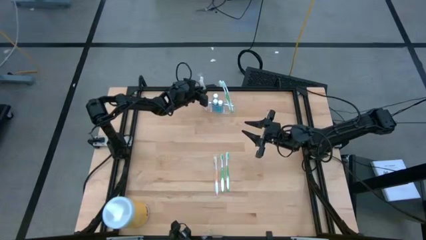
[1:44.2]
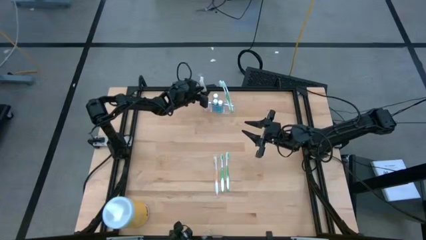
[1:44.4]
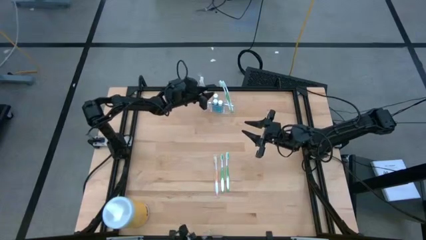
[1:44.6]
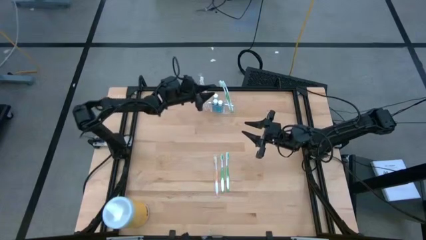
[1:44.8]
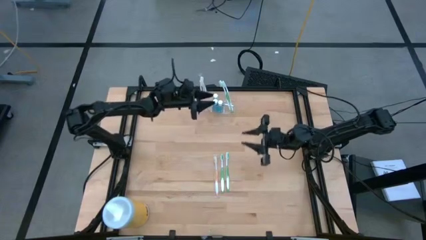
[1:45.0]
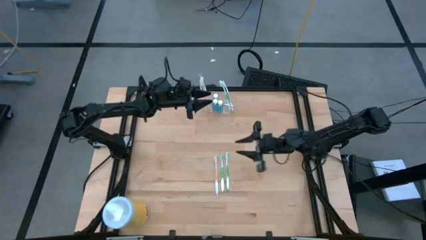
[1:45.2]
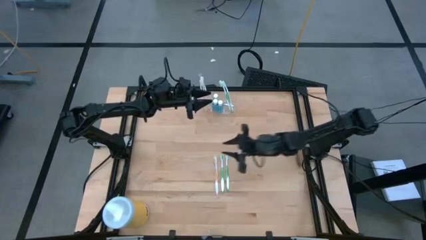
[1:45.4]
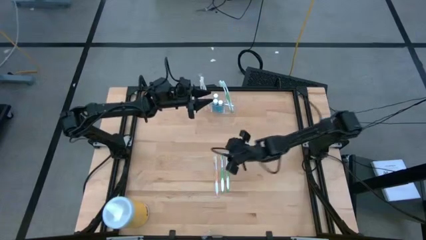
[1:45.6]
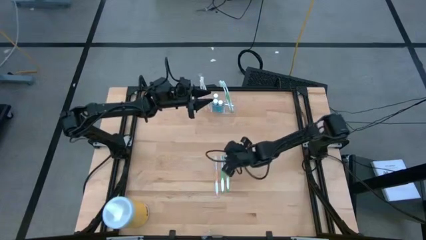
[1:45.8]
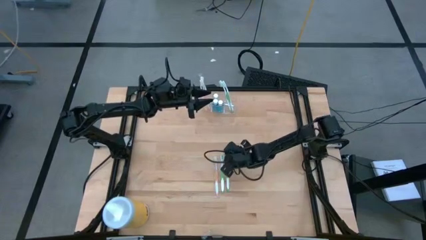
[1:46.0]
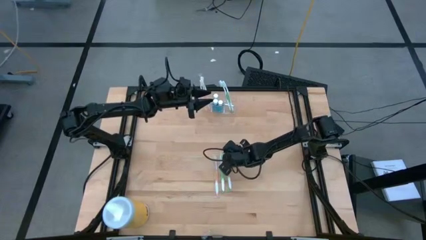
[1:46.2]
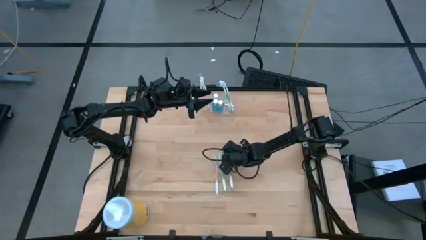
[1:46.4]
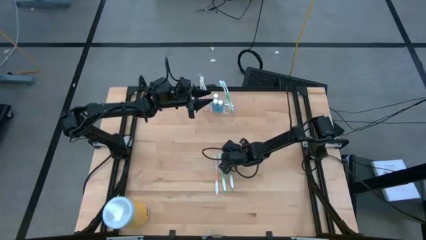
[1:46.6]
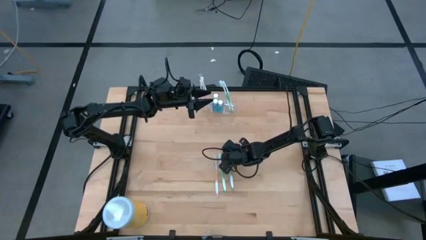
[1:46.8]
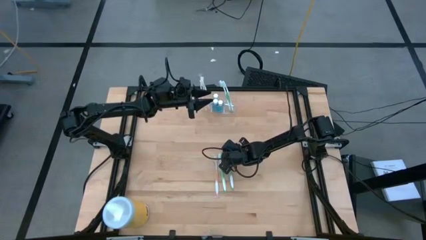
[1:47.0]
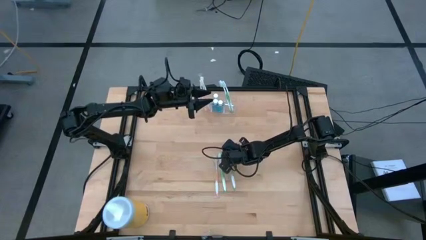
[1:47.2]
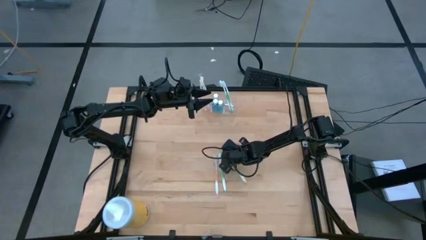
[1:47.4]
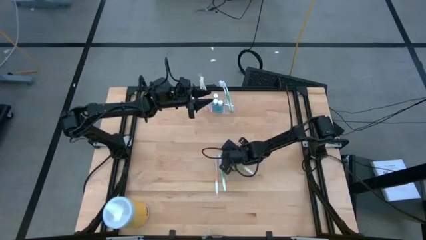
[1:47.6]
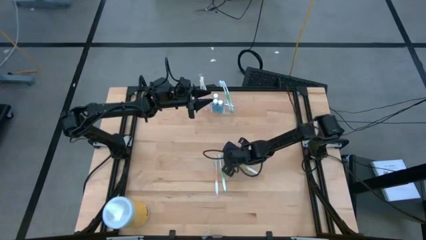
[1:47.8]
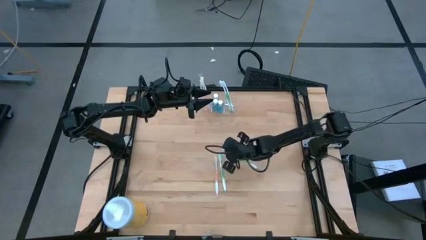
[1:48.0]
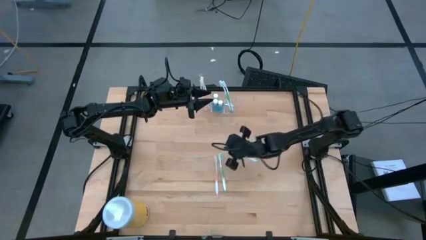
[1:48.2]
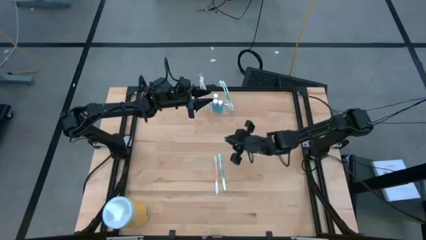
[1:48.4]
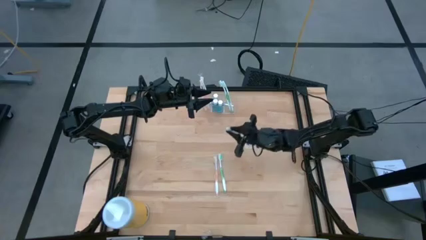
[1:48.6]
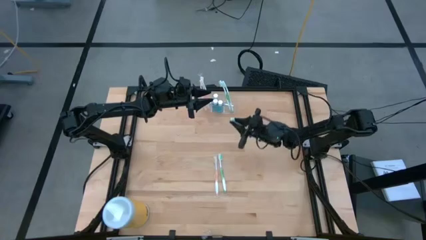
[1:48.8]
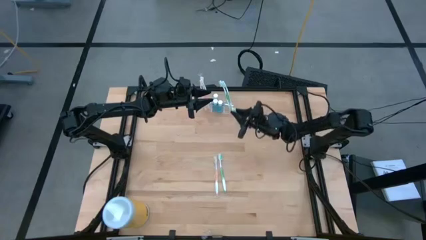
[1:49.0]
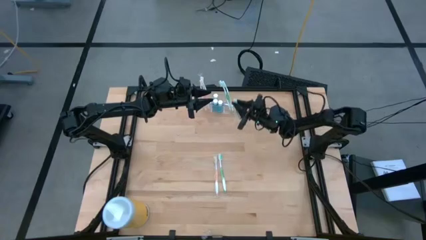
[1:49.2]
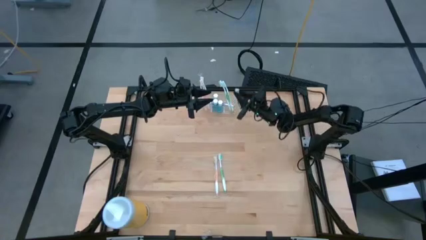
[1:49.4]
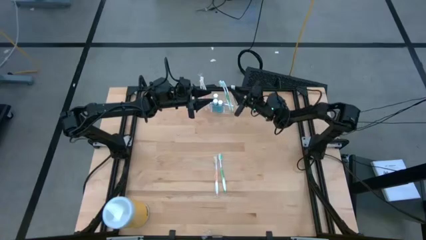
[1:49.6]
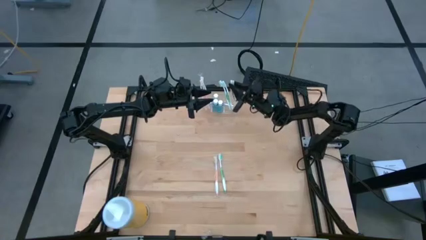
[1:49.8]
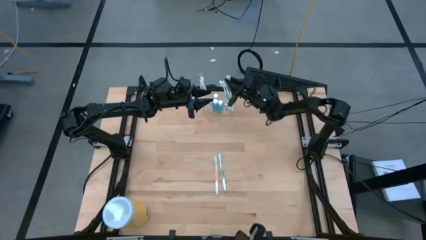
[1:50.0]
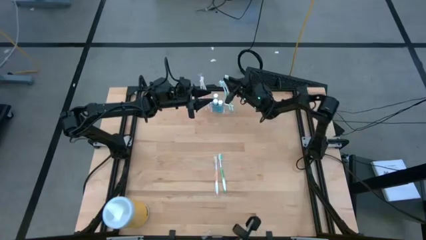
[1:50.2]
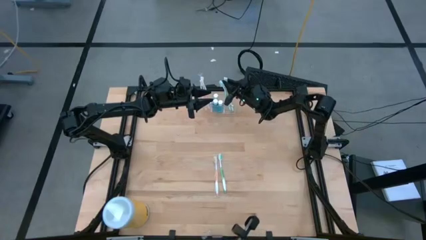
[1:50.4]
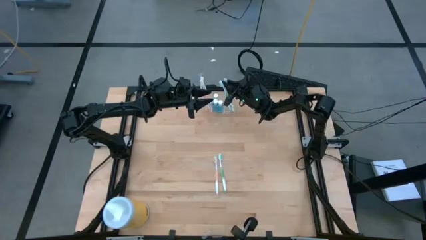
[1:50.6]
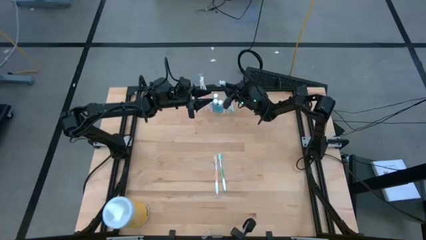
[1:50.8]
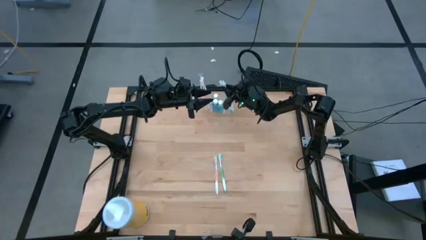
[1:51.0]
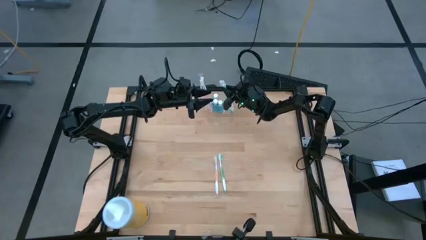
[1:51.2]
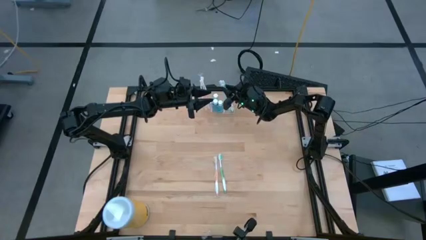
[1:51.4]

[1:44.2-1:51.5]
Task: Pick & Place toothbrushing station
Put the green toothbrush into the transparent organizer

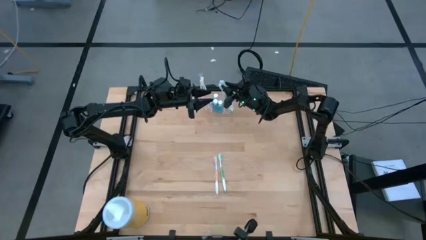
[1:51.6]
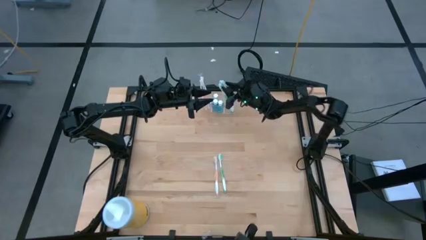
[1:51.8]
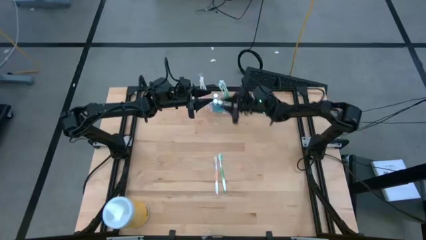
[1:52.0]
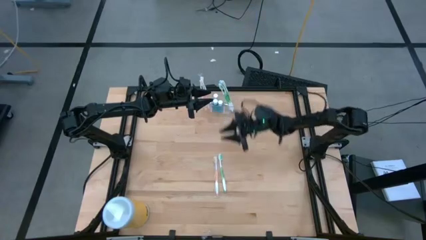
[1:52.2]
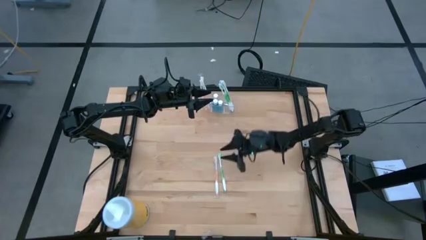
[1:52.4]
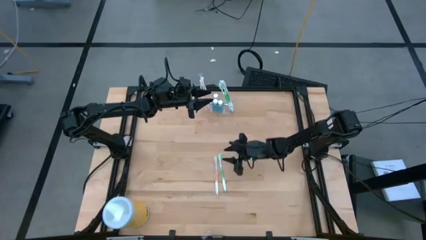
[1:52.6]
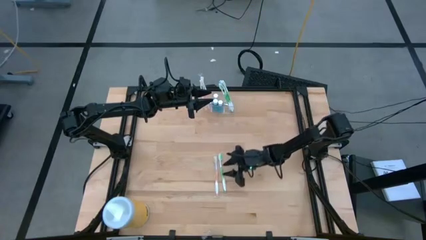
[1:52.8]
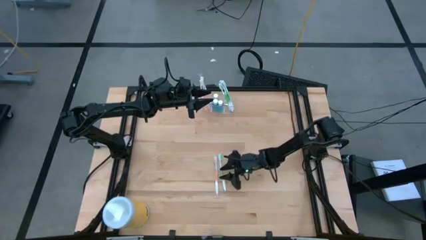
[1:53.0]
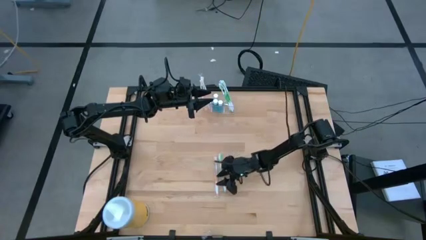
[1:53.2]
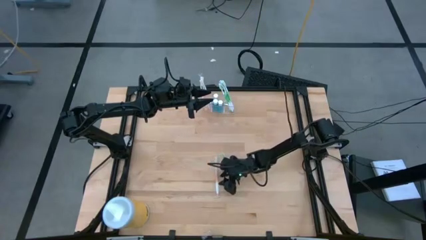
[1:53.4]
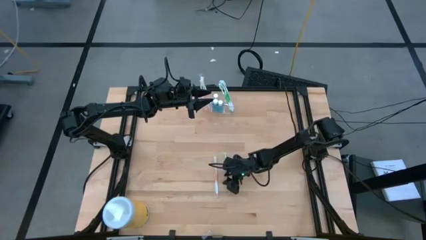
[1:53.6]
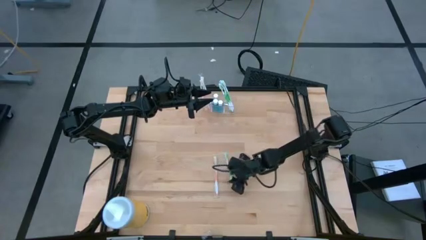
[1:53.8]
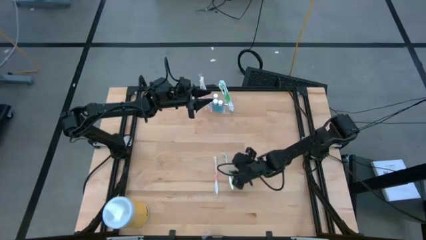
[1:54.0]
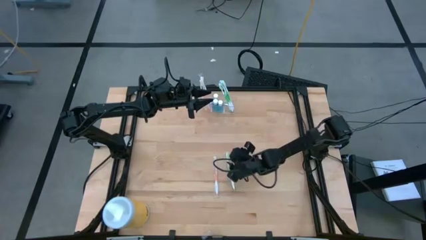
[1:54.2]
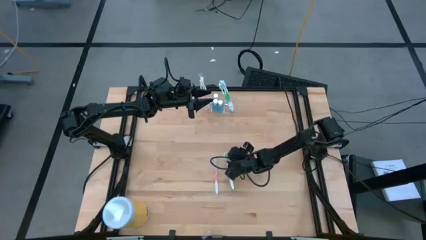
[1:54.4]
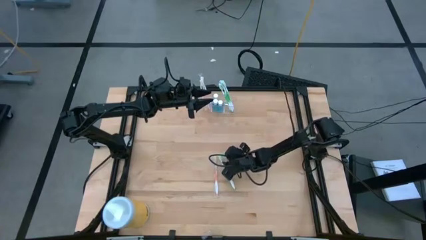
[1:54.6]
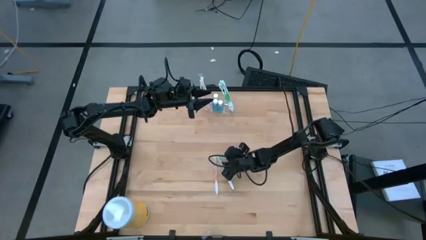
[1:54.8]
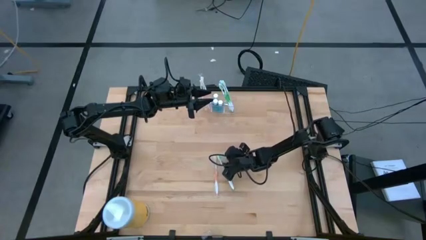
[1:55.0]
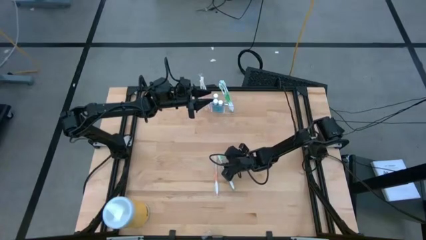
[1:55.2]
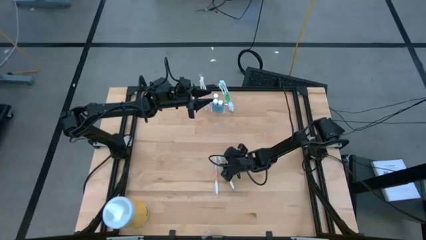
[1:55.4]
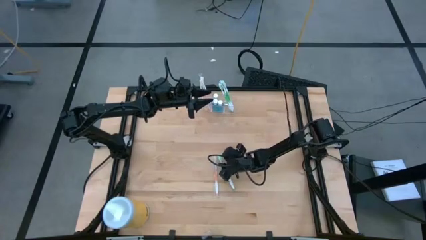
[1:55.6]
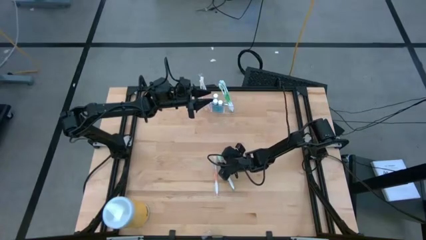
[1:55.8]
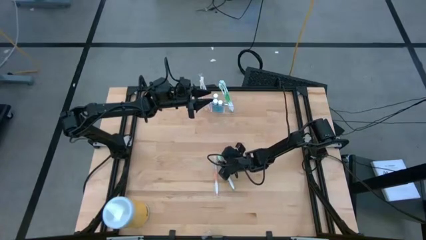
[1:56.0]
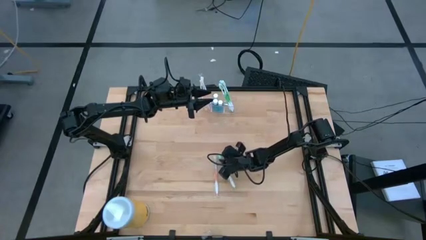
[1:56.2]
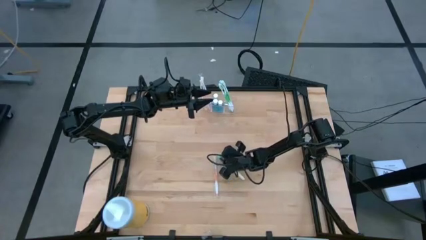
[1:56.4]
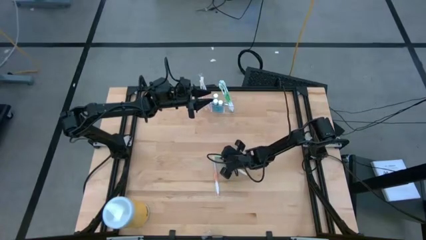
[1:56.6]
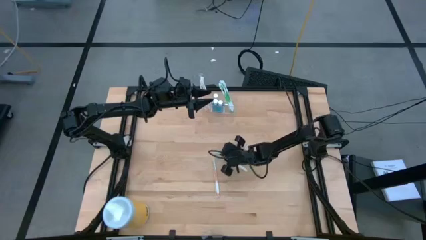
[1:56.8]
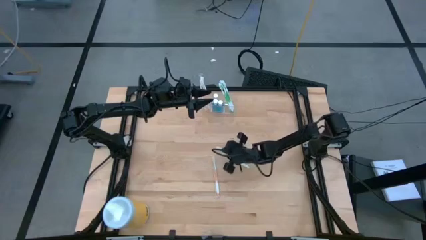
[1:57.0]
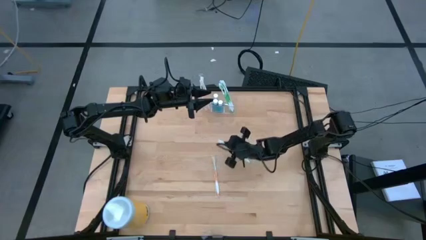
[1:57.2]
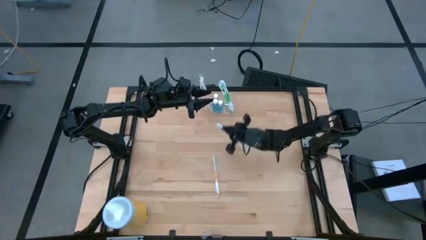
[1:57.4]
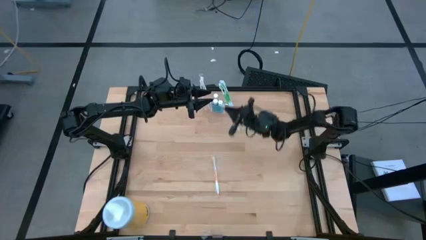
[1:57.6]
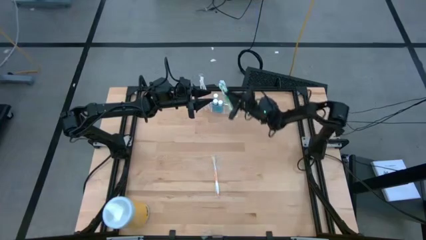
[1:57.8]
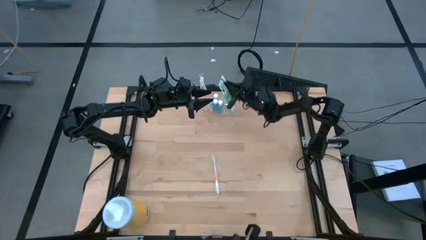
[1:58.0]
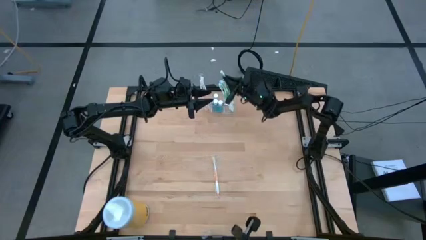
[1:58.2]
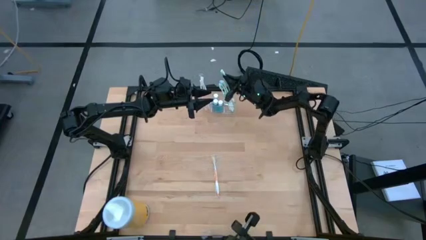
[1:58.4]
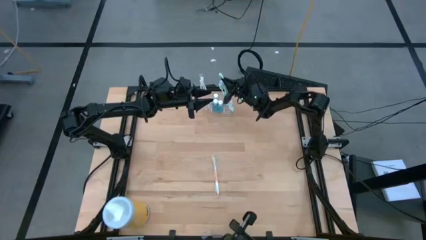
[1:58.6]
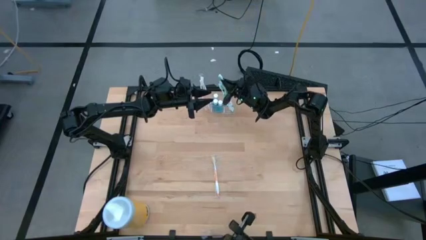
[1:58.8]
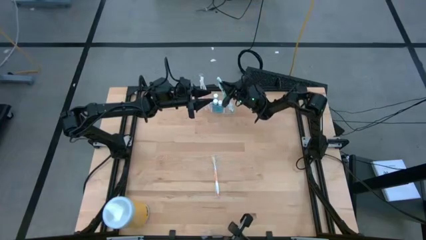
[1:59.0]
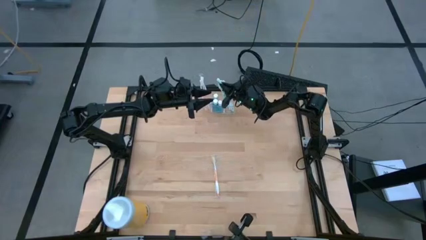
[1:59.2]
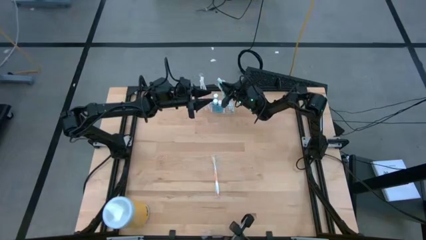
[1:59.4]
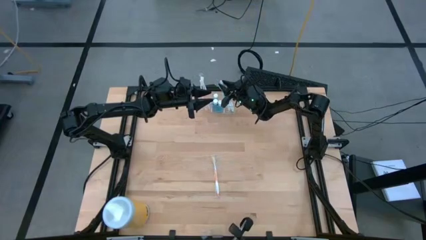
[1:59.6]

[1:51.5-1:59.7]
Put the green toothbrush into the transparent organizer
